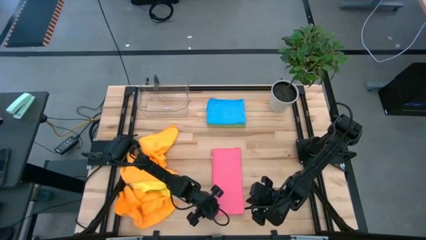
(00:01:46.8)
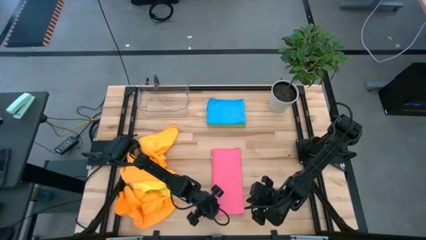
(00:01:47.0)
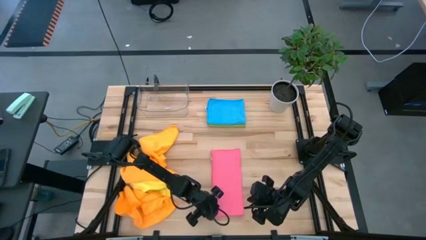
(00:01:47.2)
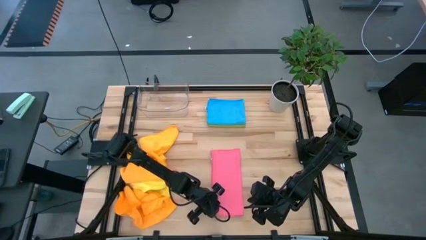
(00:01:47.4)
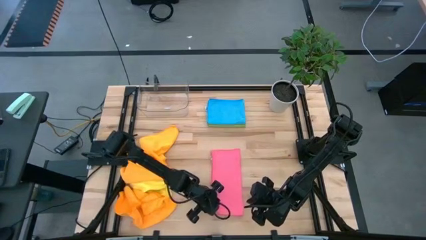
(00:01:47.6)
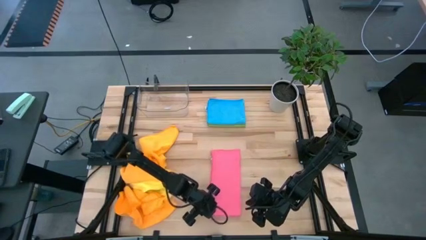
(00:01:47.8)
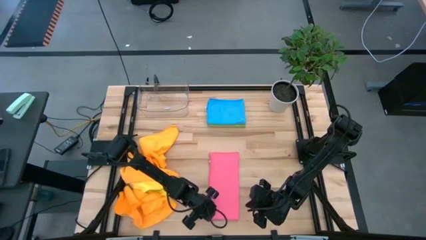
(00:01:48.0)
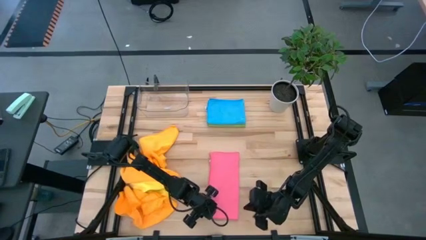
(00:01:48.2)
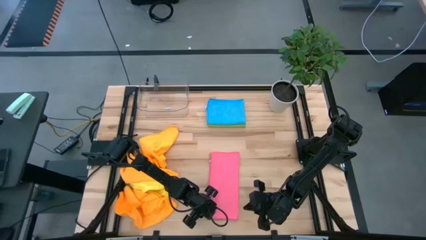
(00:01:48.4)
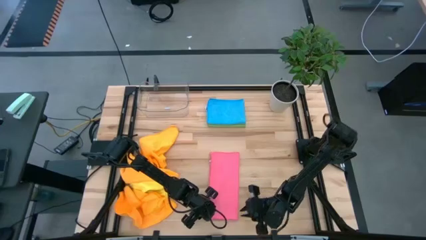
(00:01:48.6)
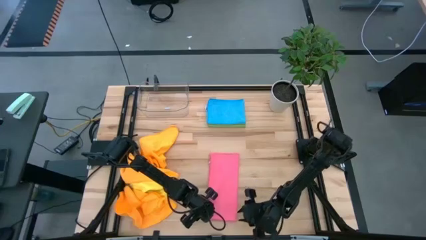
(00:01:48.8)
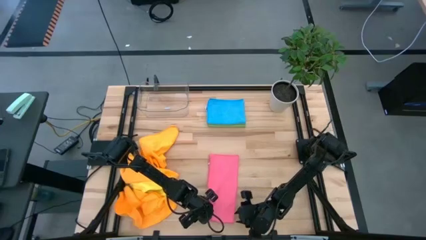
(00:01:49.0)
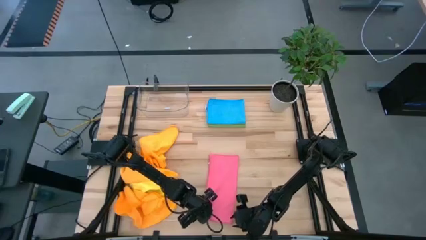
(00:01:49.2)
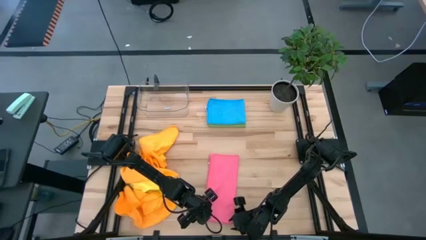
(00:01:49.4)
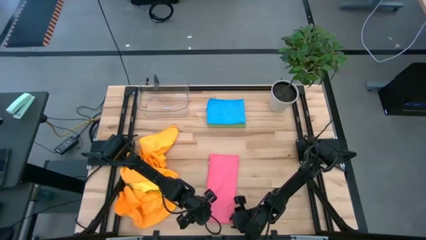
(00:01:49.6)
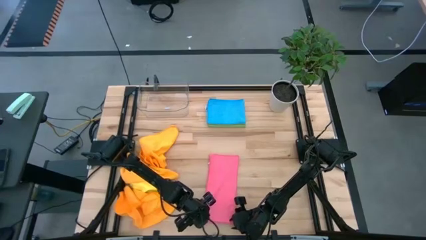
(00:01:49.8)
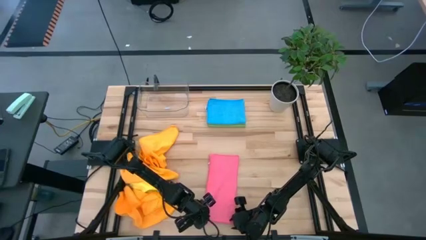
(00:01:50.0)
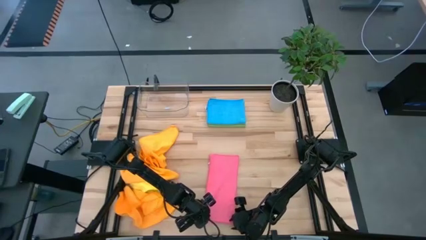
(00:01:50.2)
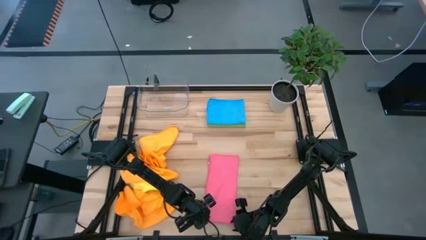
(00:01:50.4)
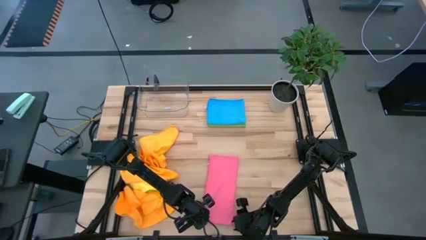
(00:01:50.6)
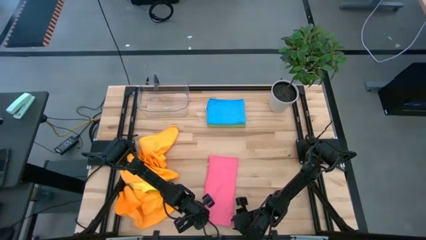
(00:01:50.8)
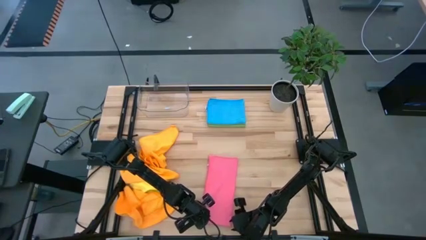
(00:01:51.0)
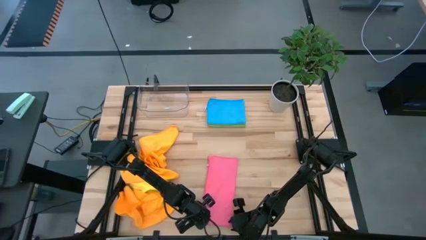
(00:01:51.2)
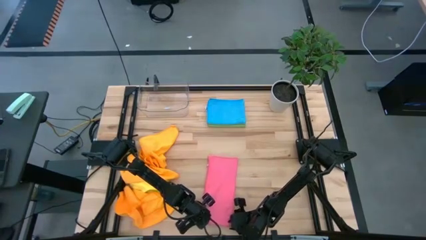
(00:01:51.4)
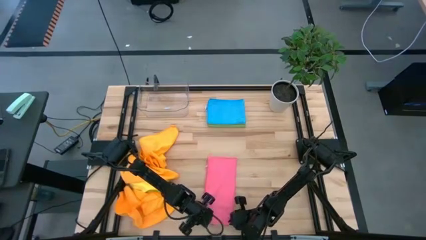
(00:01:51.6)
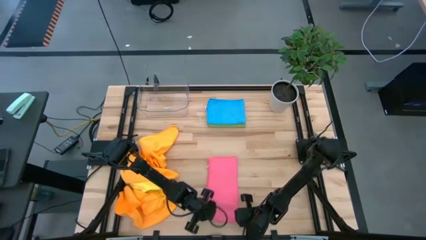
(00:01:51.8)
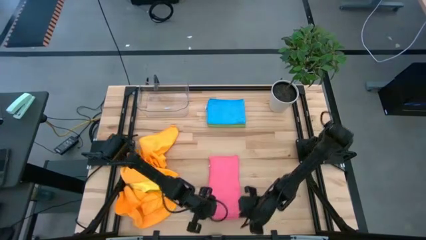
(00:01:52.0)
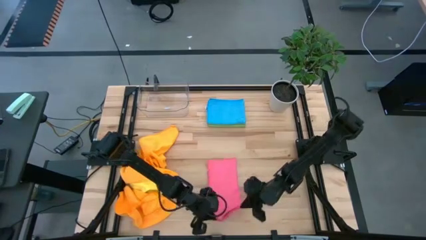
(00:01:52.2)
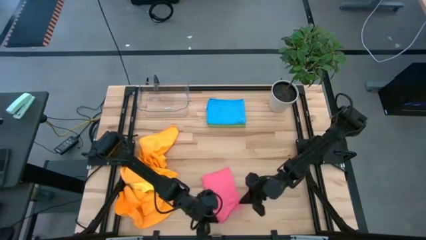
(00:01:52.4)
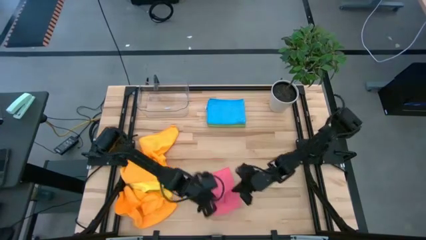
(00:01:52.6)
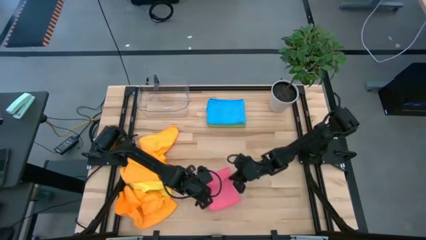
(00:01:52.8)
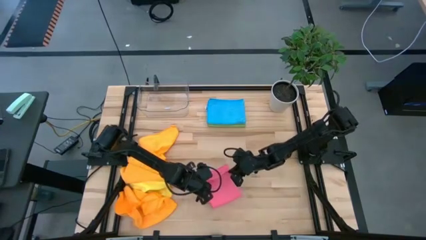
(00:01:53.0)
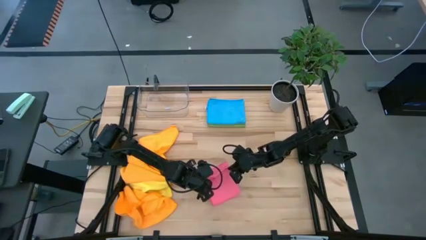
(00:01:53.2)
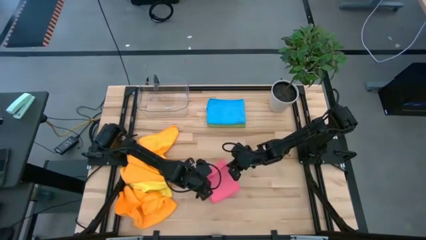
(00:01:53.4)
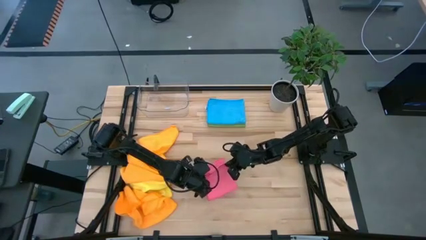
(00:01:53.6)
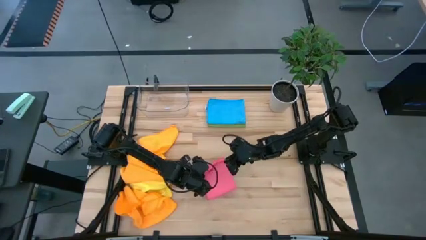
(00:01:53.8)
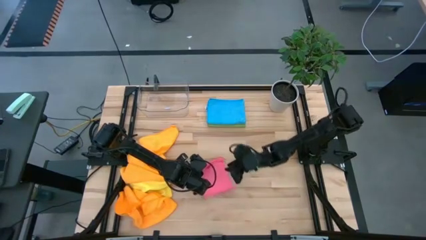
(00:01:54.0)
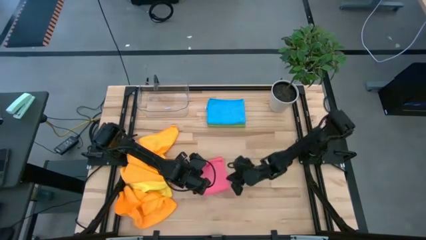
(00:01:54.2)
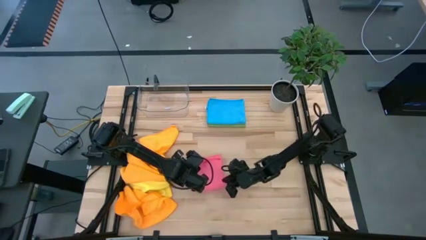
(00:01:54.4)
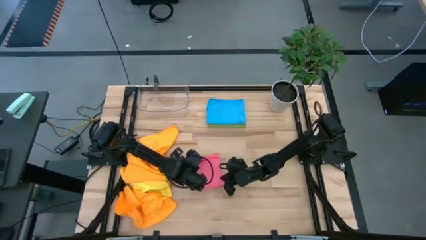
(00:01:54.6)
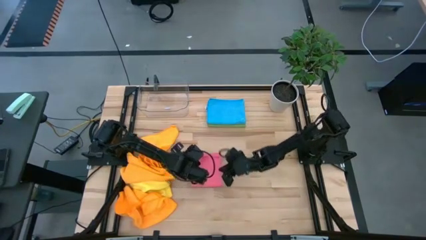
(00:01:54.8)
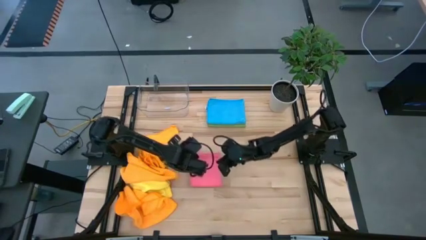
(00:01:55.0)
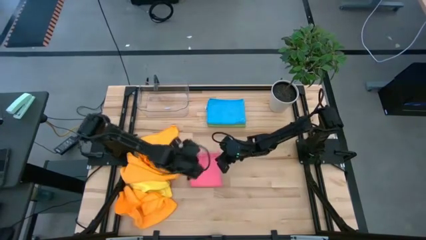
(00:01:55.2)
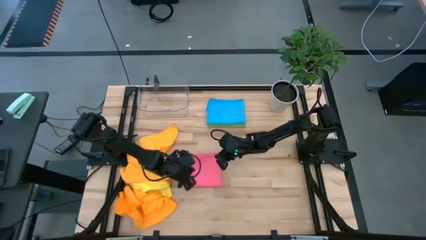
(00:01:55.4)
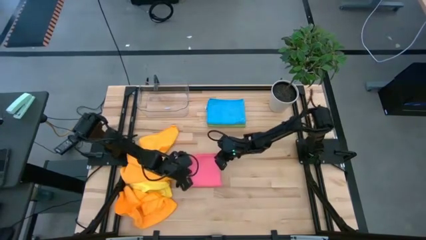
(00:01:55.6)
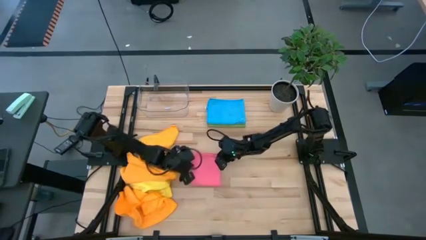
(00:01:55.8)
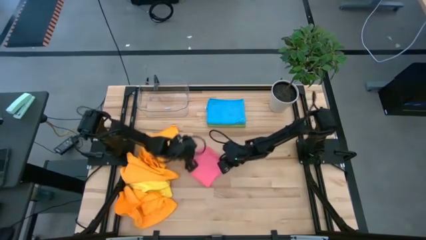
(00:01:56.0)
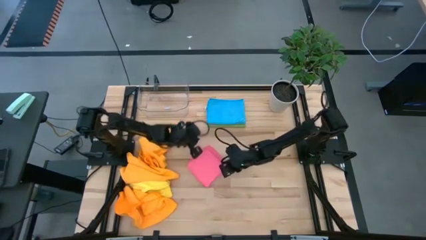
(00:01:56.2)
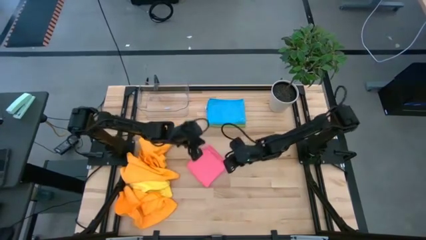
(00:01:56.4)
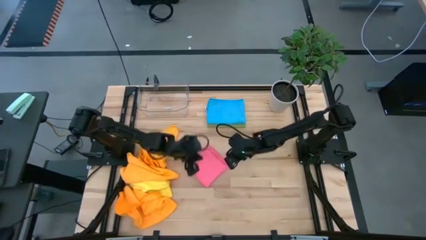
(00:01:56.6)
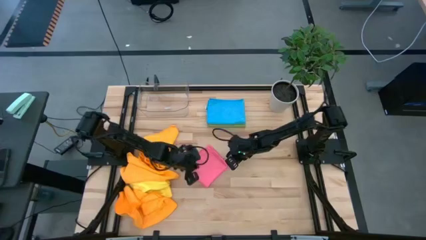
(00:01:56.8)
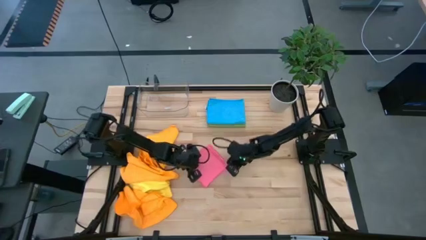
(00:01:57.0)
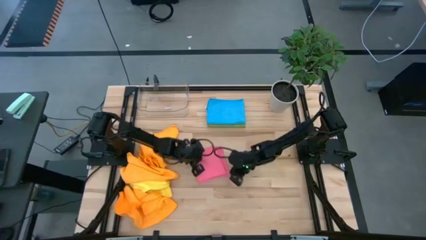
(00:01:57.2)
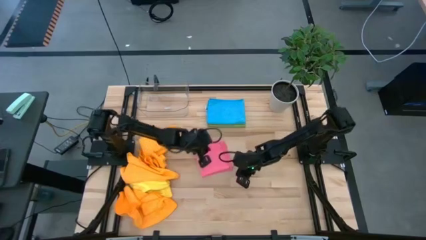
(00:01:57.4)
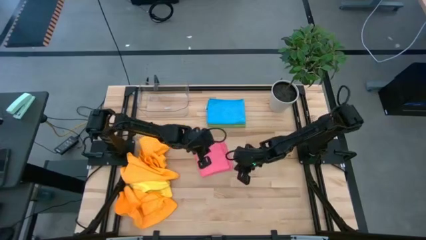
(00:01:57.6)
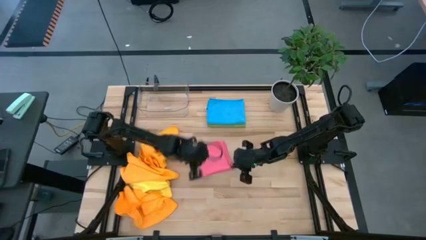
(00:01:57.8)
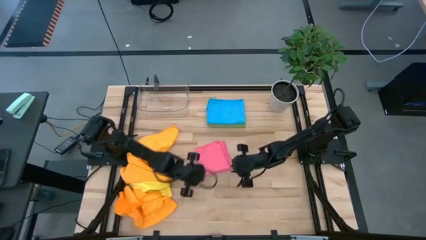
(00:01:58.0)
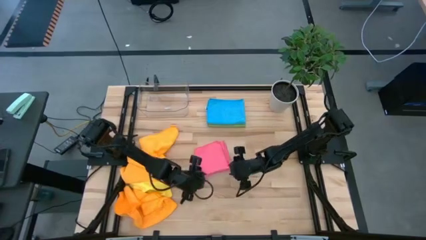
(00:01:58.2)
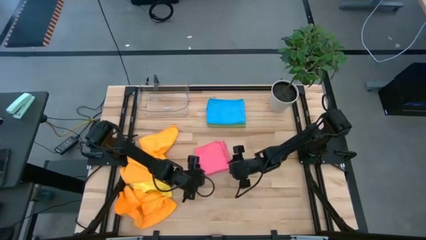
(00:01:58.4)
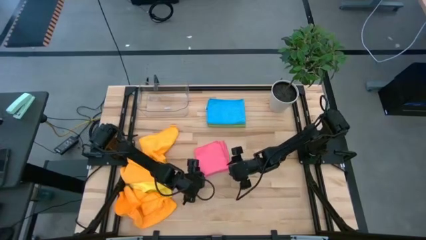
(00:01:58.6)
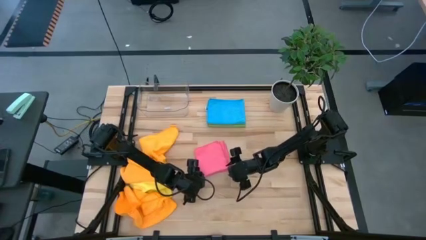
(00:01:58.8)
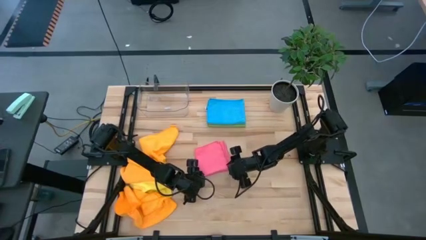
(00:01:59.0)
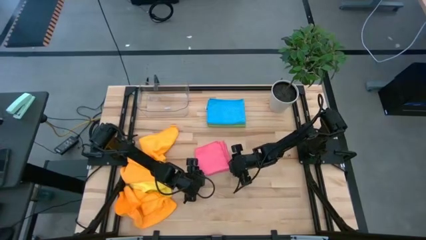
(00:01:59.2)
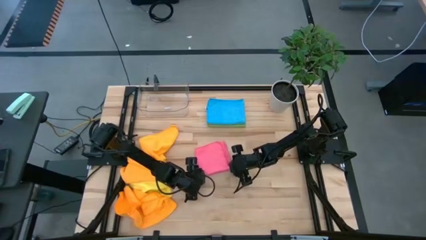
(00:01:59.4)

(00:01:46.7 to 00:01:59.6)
Task: Fold microfiber towels
Fold the pink towel

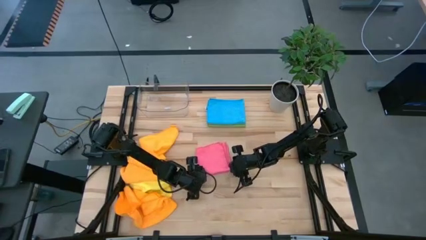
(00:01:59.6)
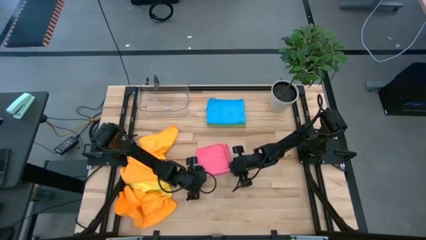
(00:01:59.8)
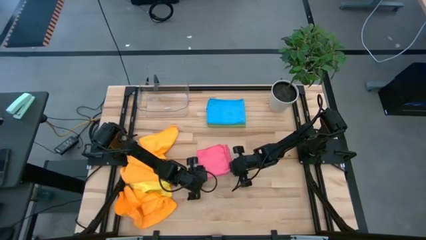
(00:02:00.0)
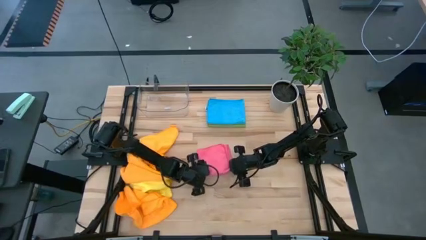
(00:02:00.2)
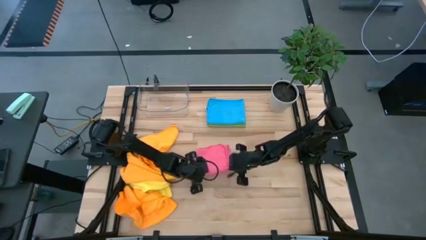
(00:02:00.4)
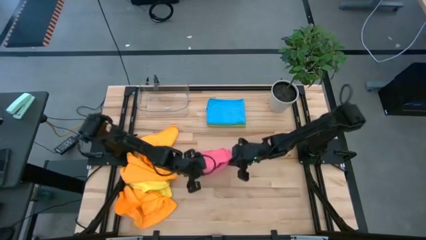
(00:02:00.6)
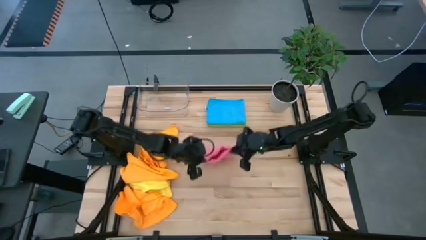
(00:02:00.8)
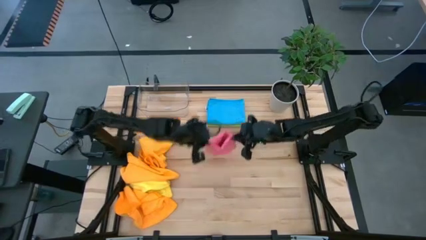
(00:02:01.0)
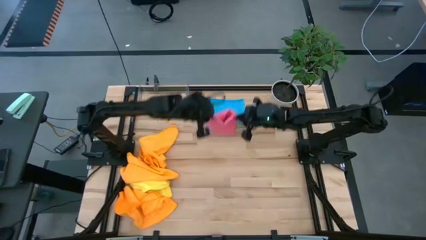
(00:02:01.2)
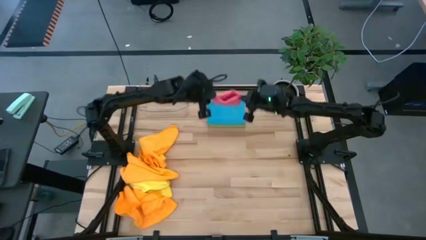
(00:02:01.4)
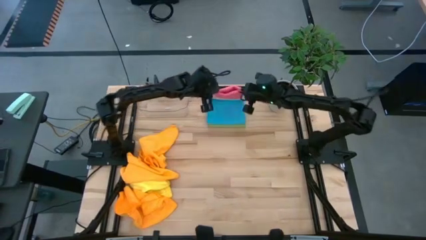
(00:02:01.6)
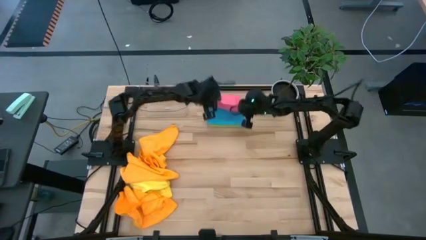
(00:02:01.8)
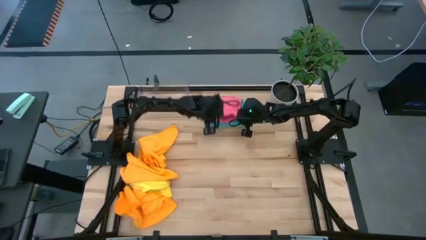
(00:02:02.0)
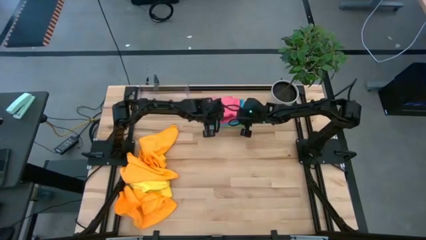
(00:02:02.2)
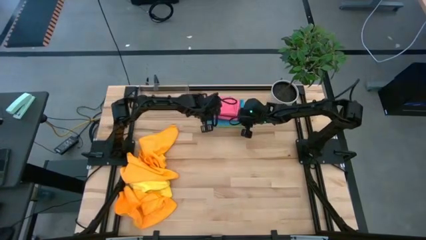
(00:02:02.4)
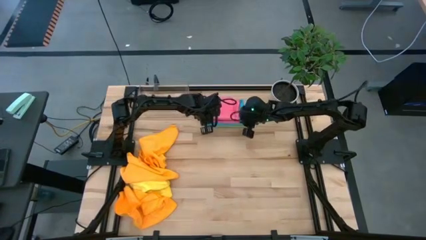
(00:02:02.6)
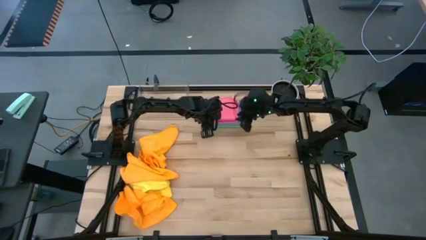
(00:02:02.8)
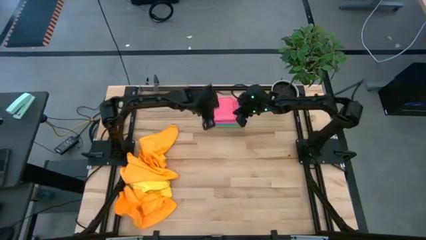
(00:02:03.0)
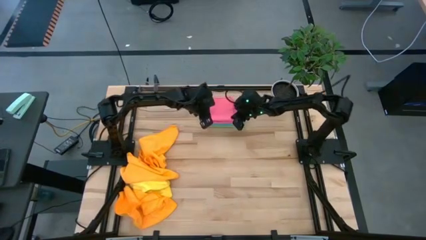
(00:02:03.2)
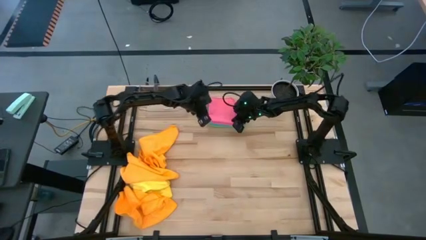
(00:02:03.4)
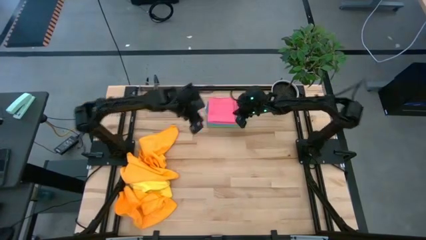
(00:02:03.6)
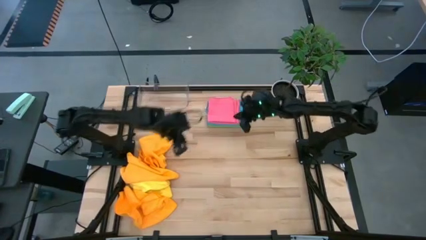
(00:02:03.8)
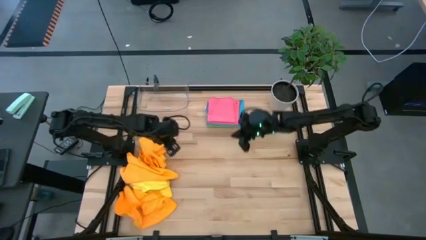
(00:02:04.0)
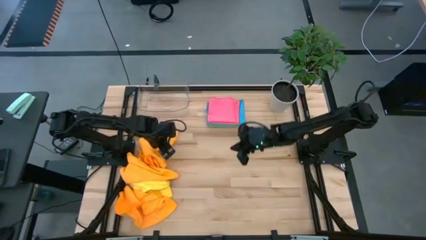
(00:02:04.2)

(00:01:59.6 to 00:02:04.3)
Stack the folded pink towel on the blue towel
